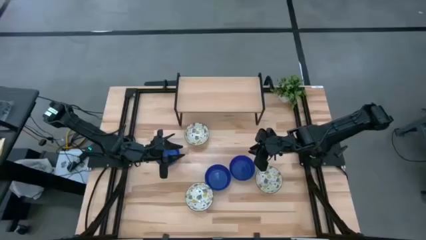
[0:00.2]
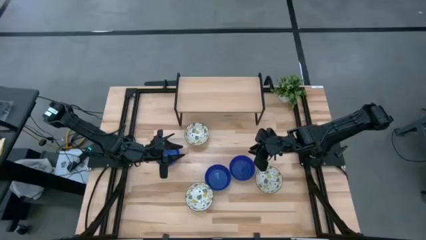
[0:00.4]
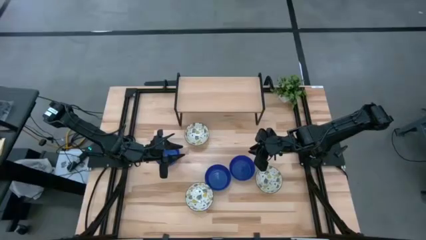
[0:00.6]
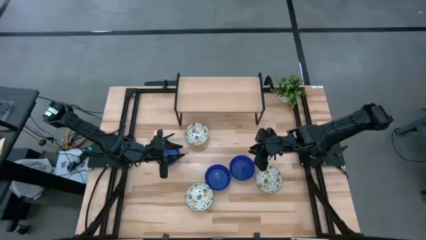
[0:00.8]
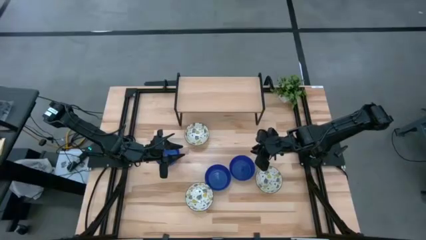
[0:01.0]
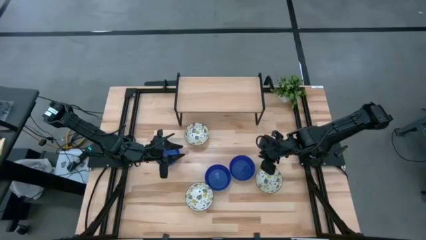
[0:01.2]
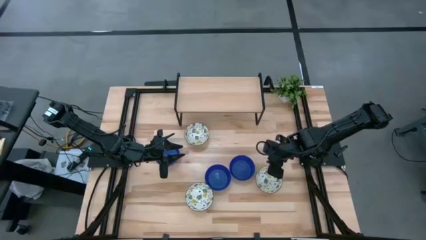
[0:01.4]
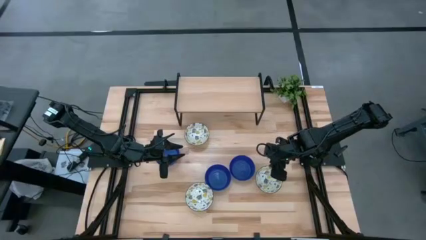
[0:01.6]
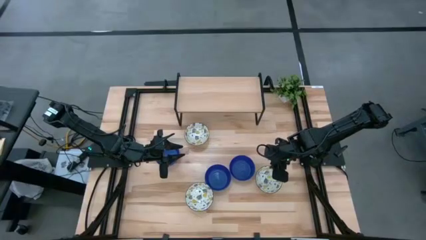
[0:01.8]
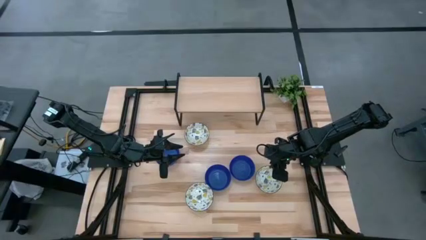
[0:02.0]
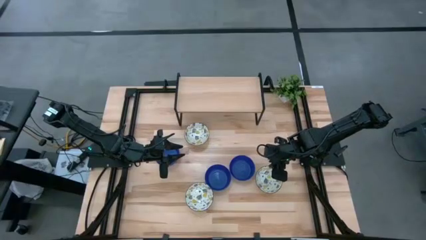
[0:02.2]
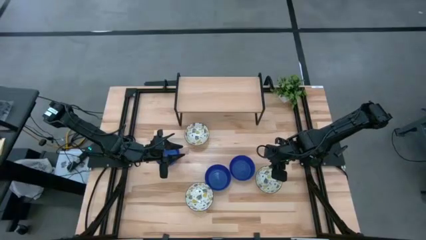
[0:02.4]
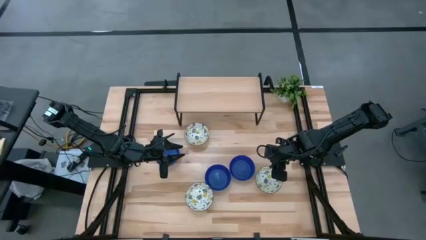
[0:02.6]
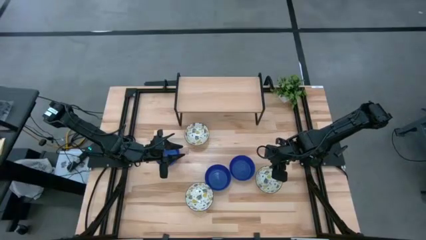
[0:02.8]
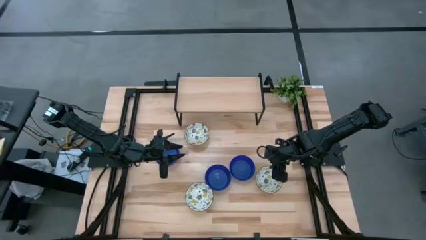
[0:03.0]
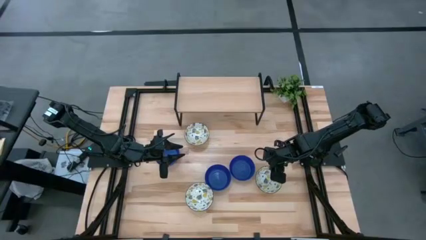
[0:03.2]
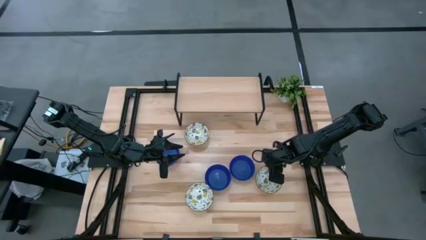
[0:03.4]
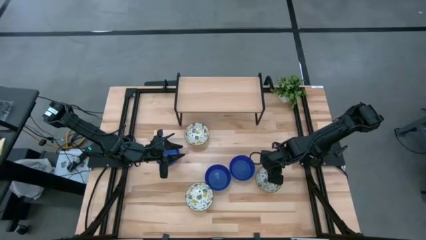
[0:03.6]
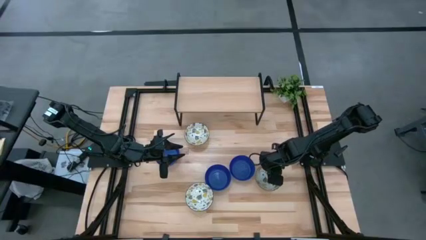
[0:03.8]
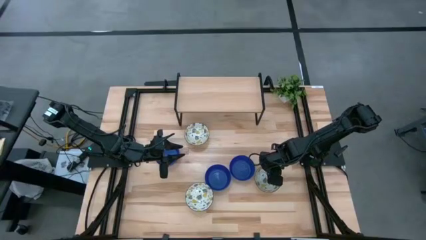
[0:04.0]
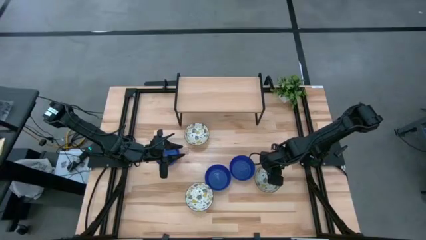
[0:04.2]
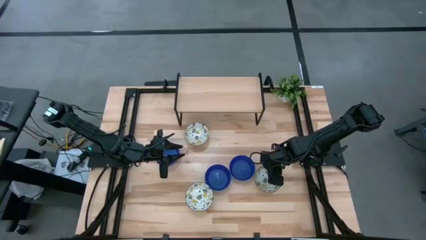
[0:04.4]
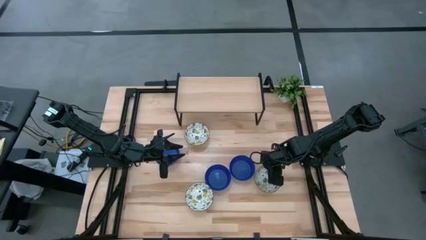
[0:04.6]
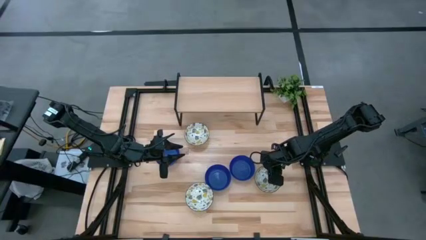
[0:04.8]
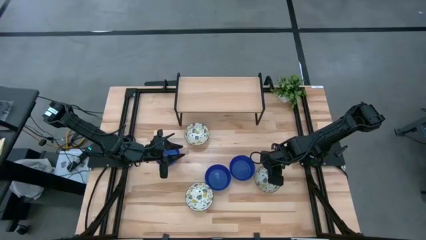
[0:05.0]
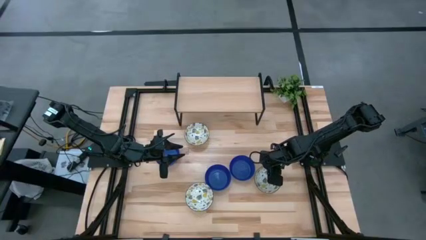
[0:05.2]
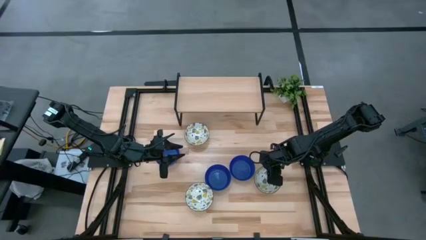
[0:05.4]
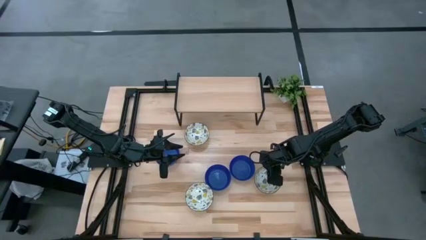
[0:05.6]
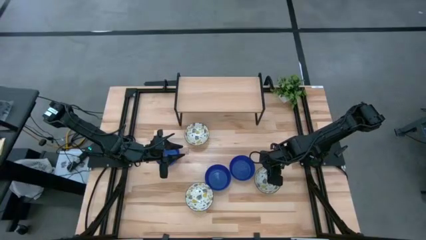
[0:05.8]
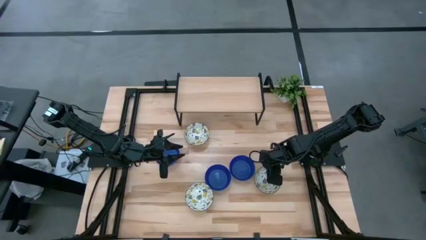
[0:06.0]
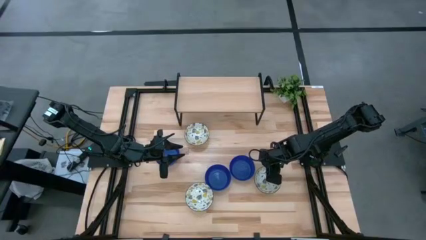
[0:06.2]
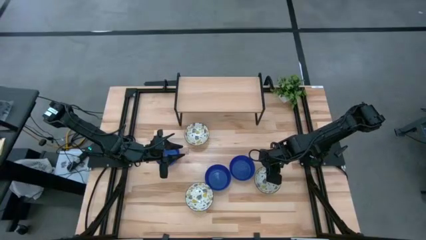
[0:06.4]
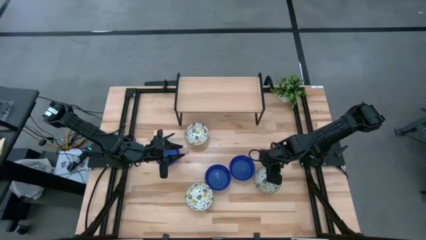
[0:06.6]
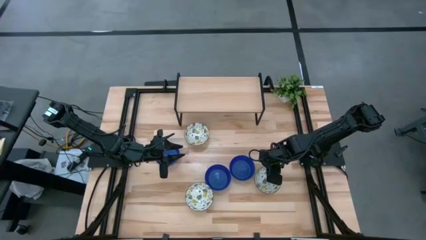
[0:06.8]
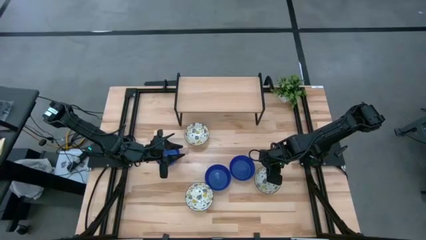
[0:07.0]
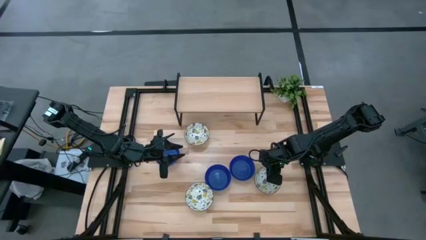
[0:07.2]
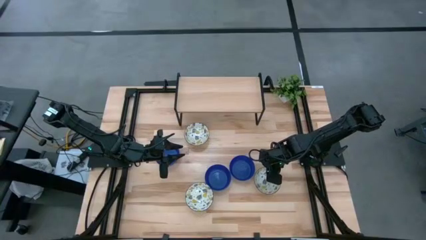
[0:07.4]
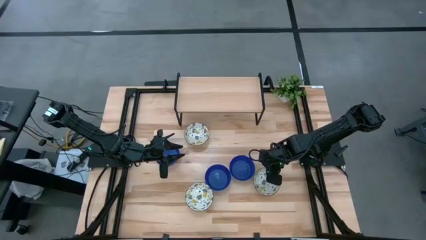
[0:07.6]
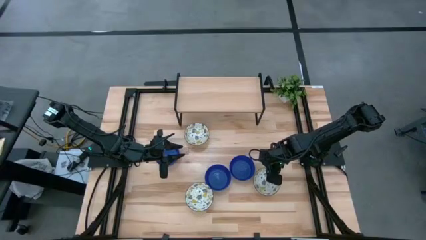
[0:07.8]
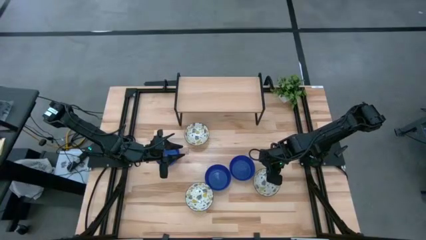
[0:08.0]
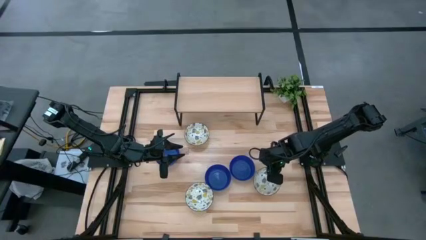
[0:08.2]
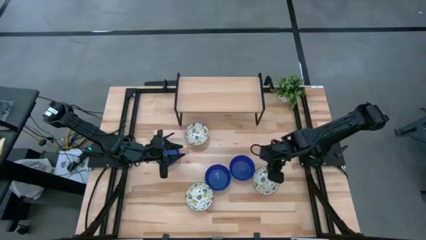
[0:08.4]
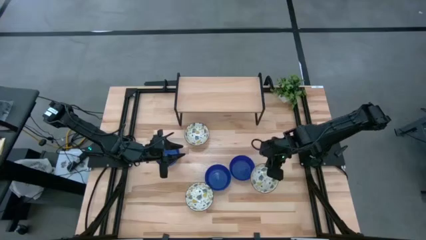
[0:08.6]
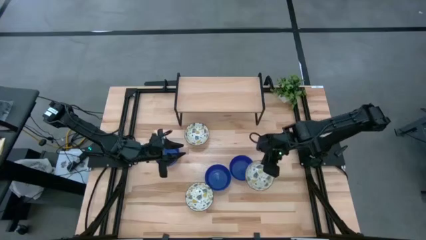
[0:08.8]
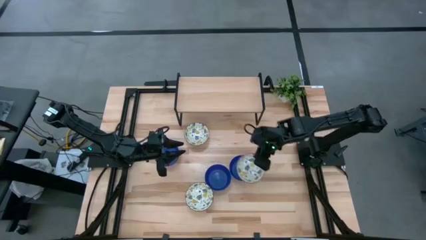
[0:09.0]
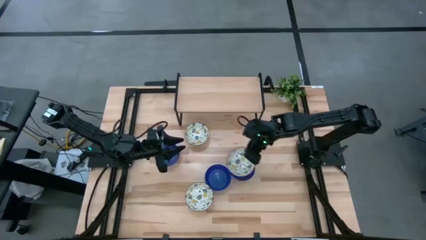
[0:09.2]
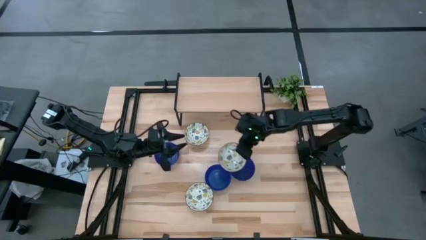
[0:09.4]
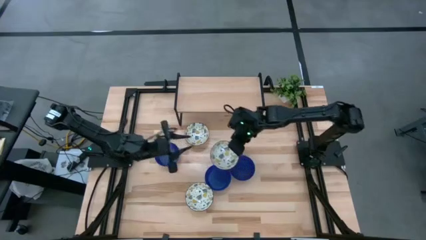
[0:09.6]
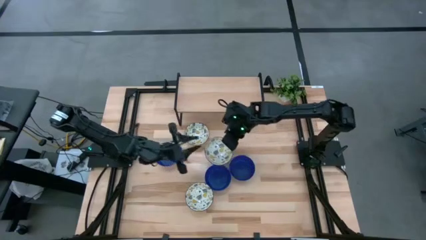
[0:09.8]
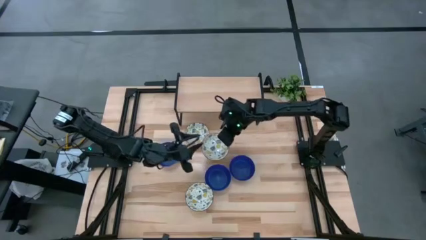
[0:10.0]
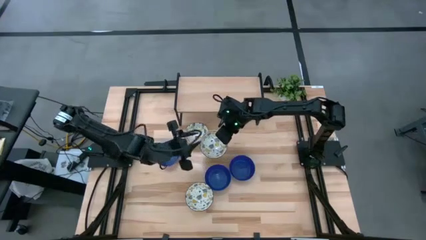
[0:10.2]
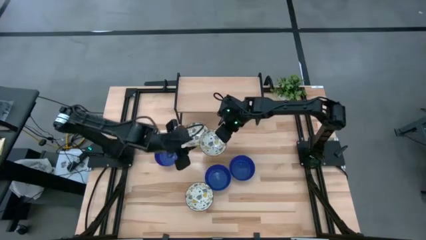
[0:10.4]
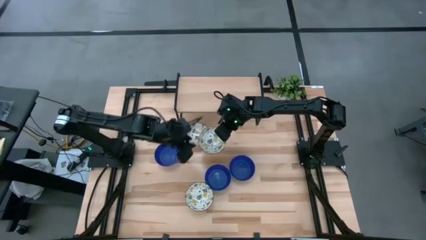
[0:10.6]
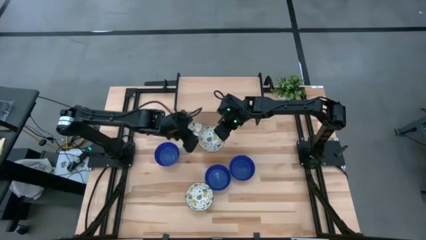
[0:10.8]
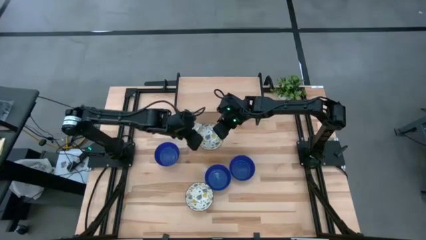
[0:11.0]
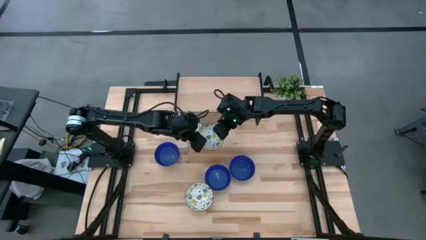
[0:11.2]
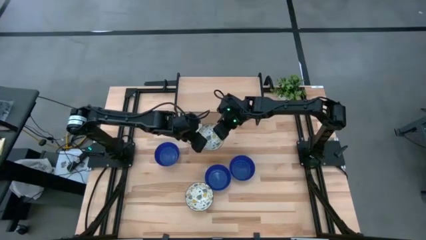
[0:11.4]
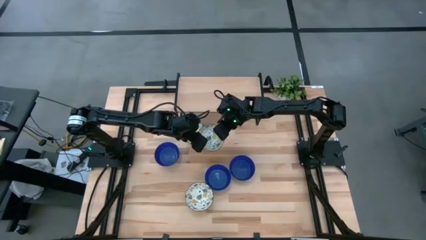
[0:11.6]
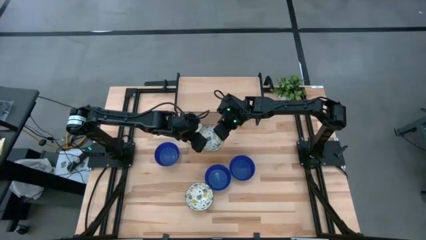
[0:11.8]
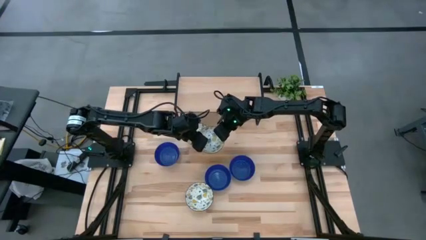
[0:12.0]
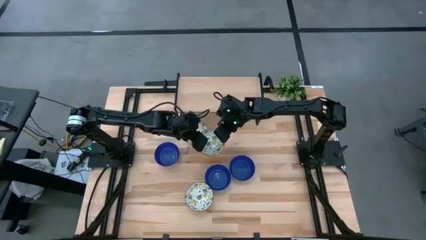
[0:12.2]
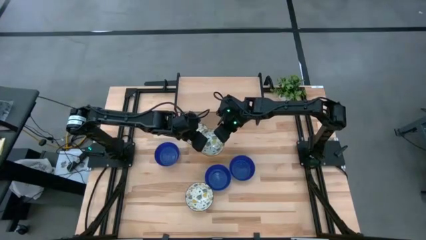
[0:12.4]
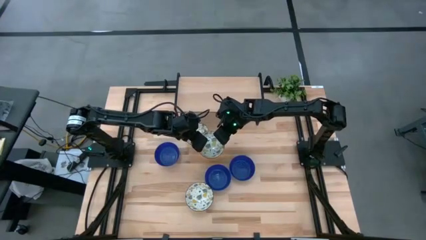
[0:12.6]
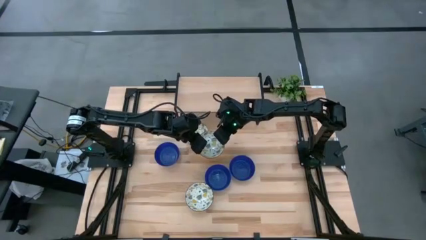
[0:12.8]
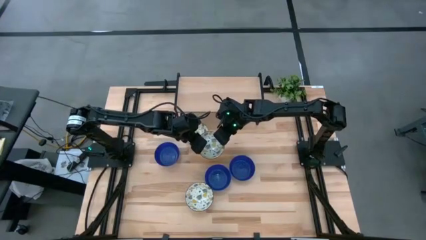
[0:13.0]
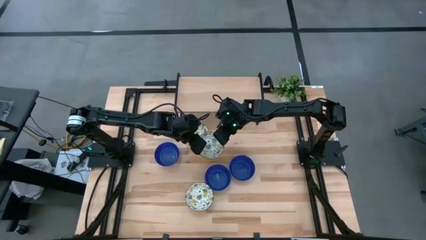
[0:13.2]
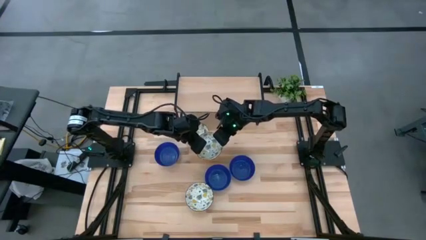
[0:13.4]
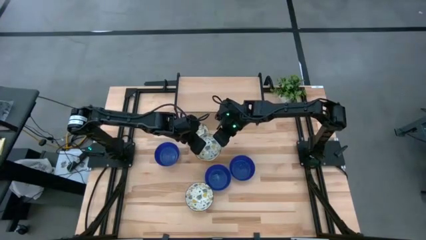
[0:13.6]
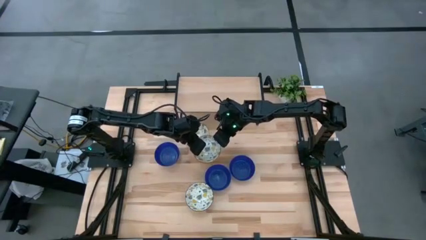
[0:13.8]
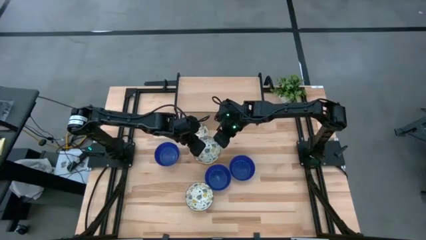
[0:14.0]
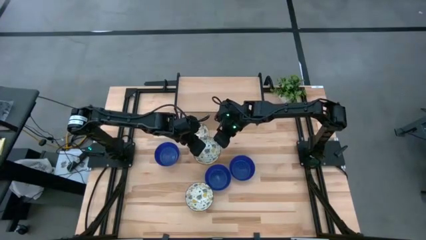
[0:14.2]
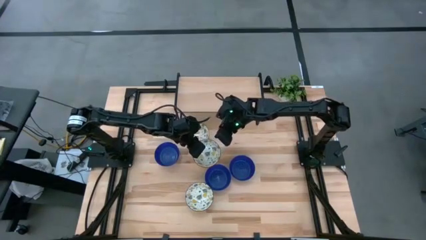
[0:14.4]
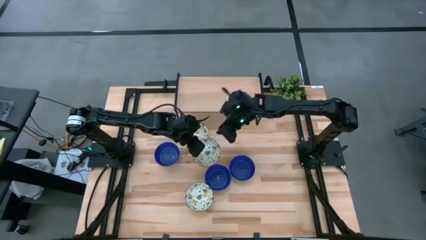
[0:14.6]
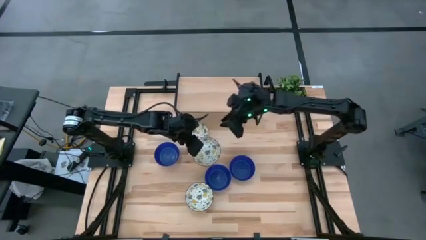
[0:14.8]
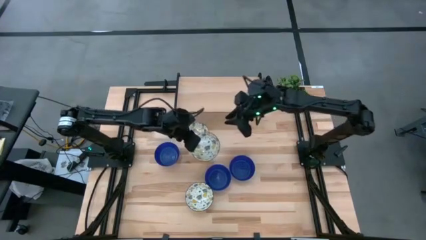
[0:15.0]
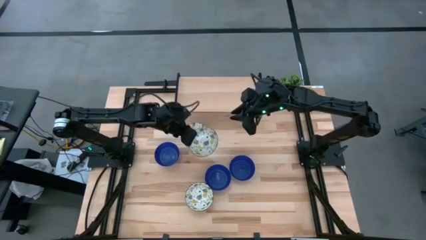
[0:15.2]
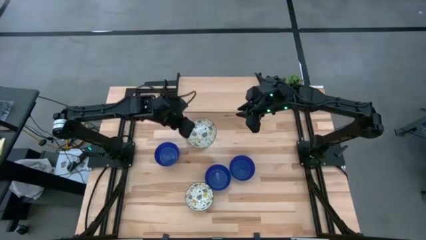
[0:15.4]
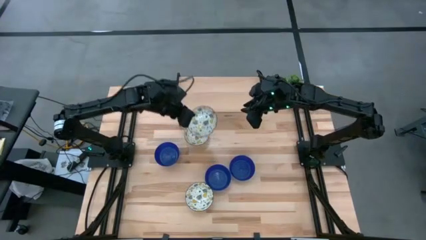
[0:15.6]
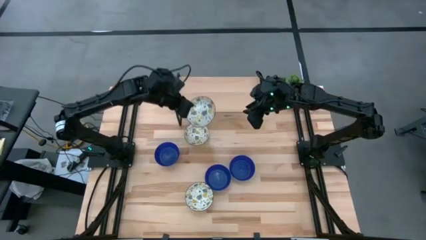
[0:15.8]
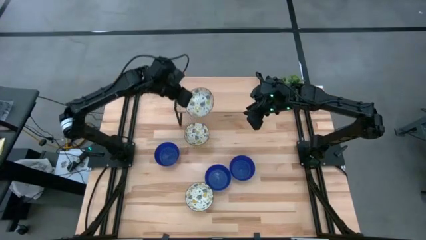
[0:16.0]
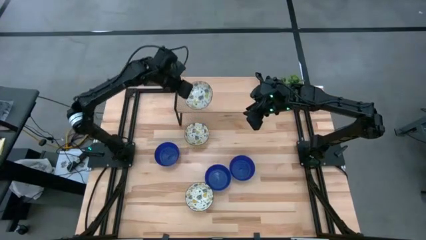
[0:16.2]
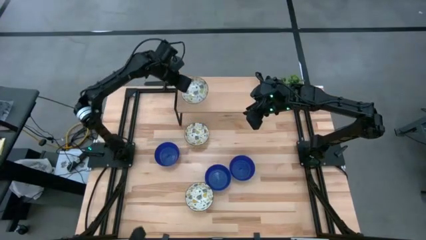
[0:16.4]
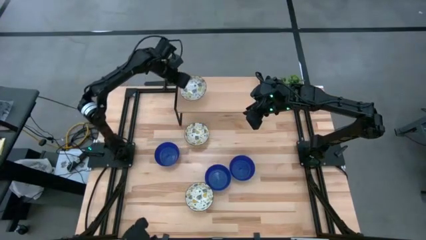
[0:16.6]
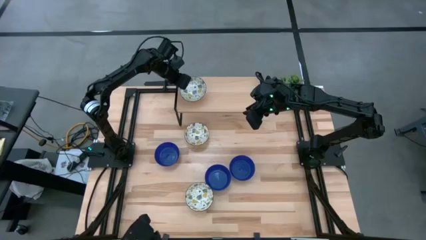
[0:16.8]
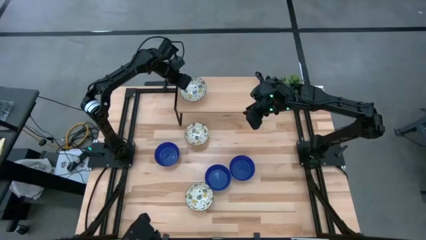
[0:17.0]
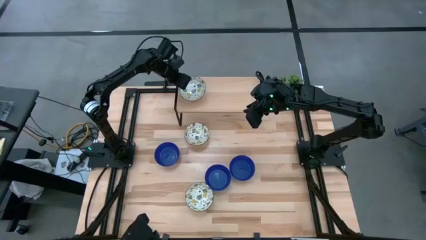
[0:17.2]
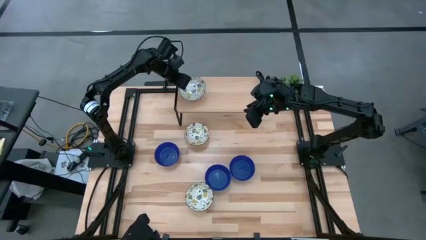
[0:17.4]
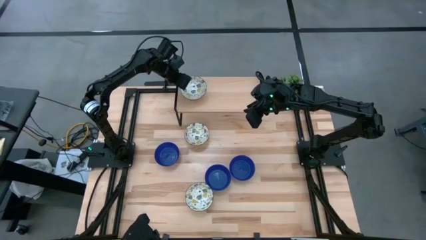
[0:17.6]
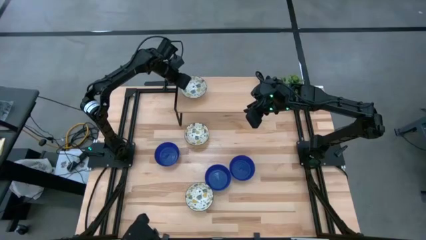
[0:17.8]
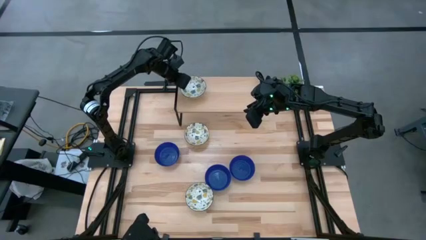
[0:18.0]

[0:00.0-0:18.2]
Task: Pick & Place Mini bowls
Put the right white patterned bowl on the shelf
